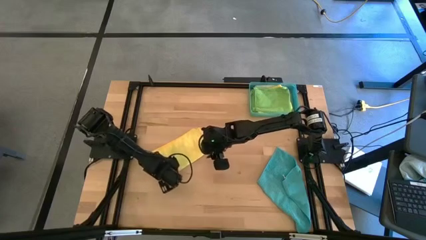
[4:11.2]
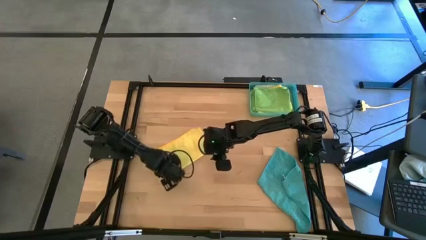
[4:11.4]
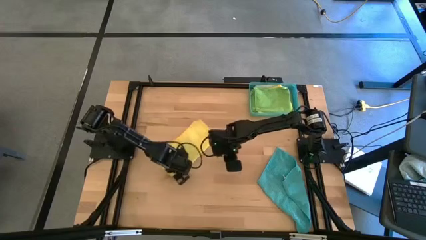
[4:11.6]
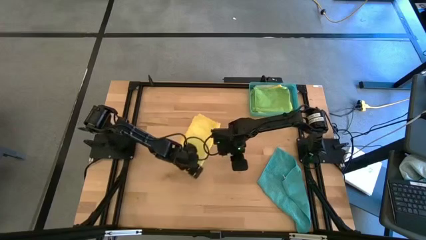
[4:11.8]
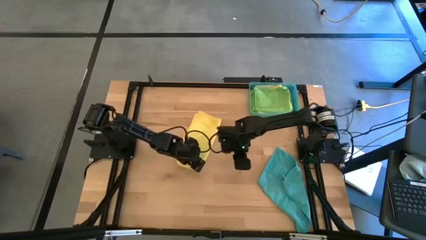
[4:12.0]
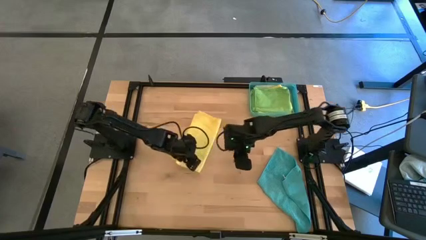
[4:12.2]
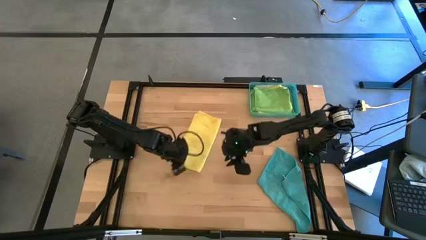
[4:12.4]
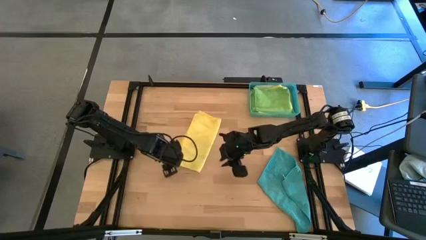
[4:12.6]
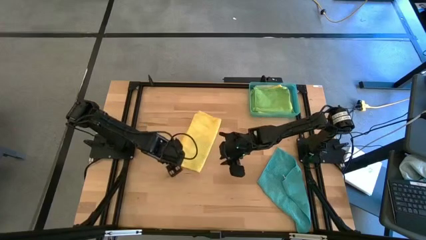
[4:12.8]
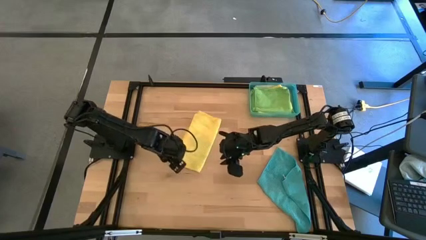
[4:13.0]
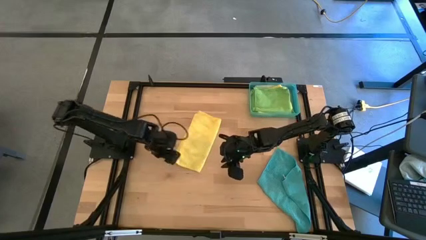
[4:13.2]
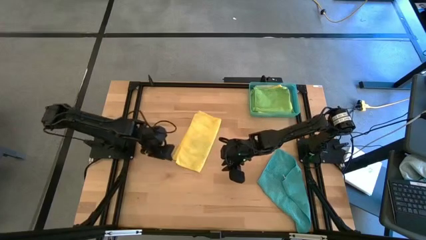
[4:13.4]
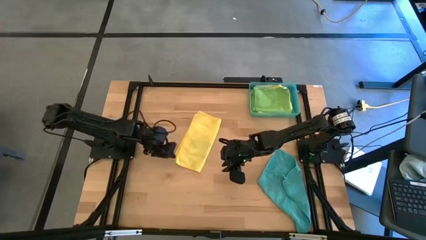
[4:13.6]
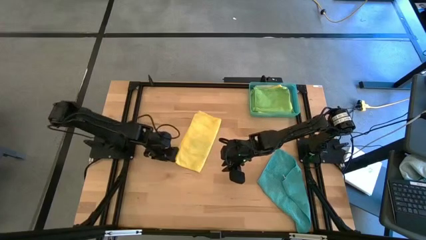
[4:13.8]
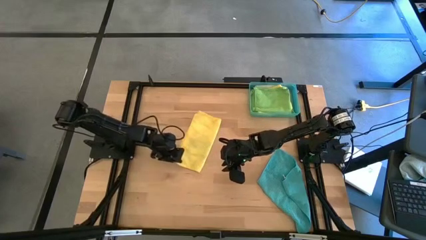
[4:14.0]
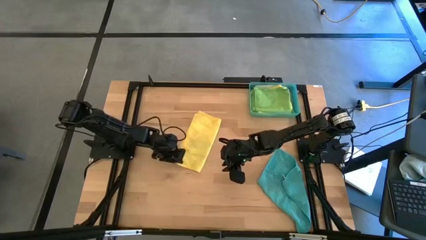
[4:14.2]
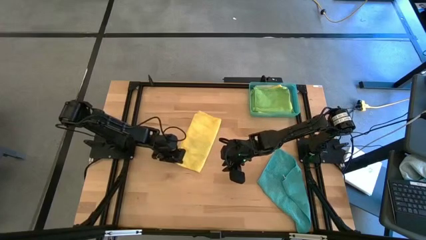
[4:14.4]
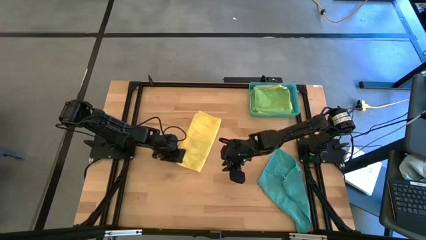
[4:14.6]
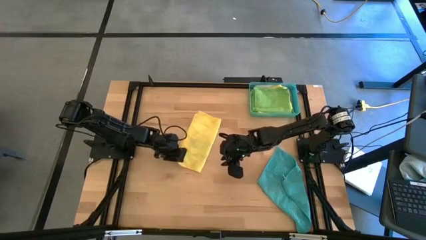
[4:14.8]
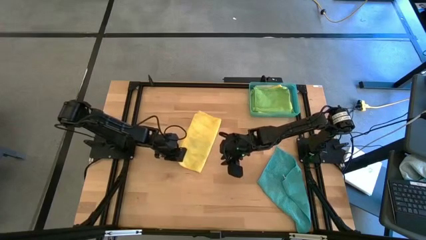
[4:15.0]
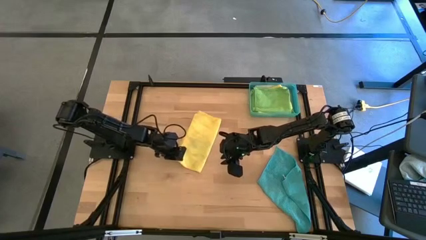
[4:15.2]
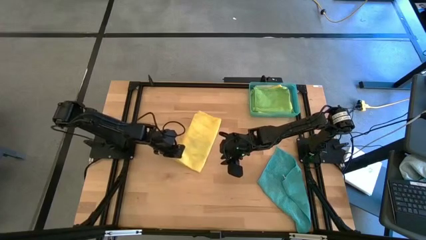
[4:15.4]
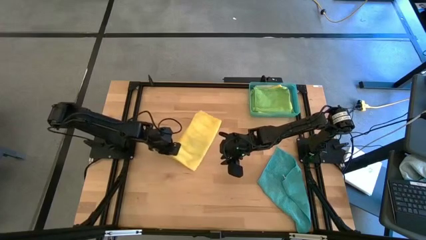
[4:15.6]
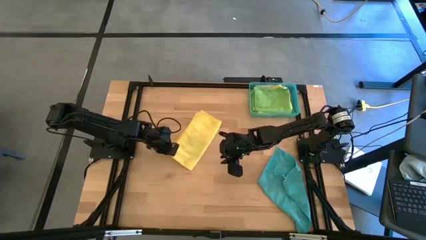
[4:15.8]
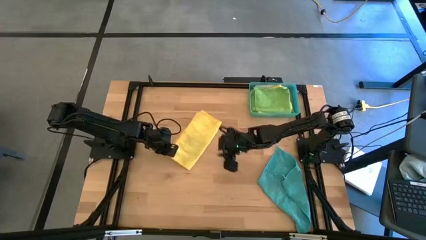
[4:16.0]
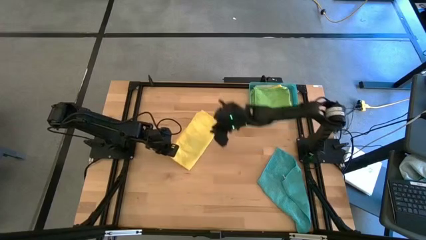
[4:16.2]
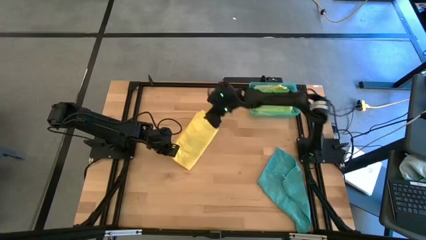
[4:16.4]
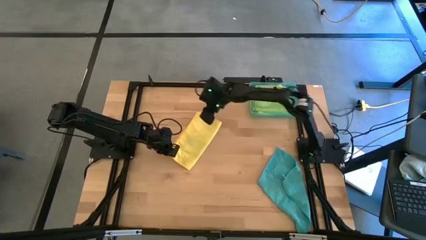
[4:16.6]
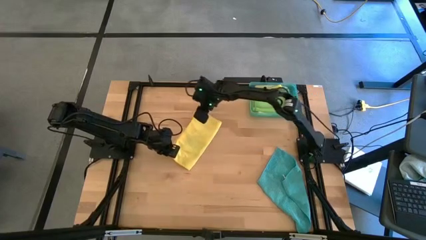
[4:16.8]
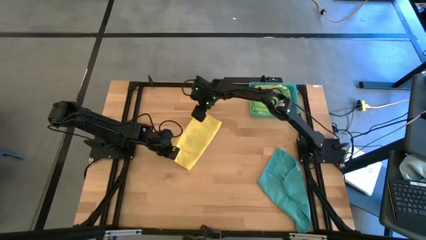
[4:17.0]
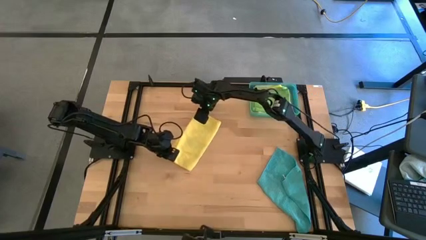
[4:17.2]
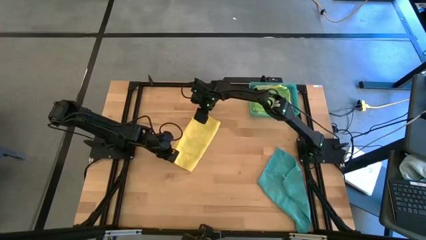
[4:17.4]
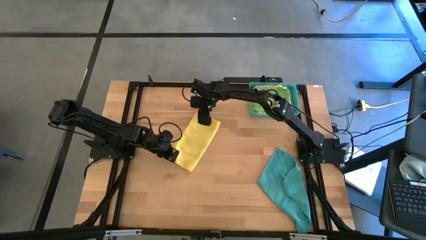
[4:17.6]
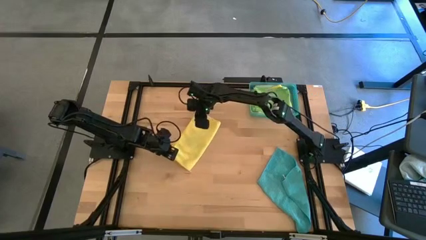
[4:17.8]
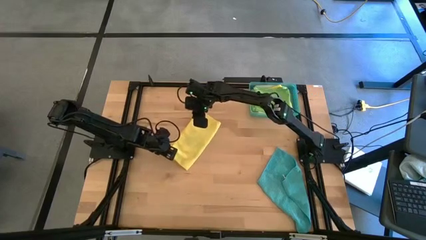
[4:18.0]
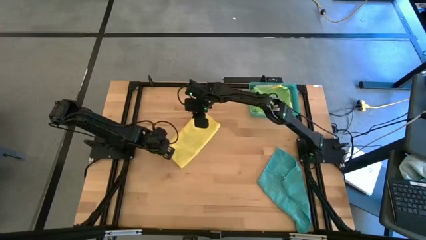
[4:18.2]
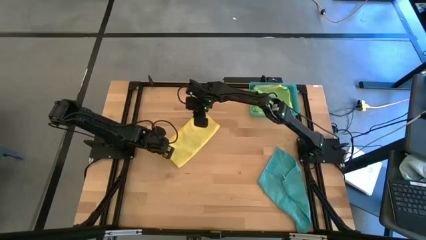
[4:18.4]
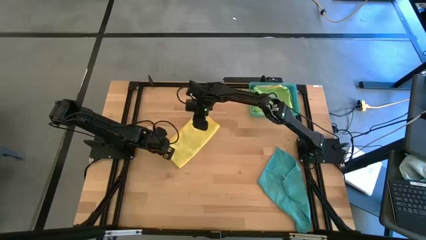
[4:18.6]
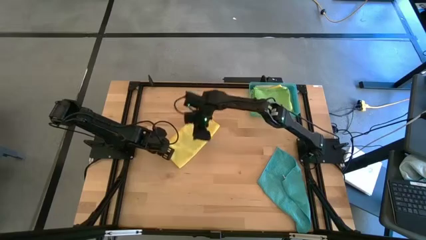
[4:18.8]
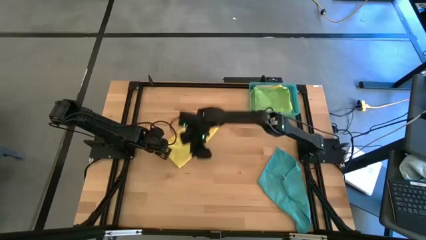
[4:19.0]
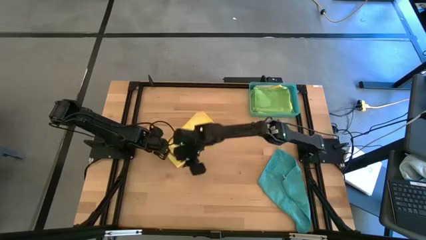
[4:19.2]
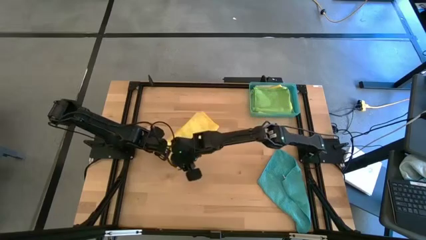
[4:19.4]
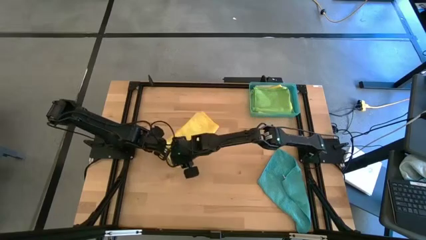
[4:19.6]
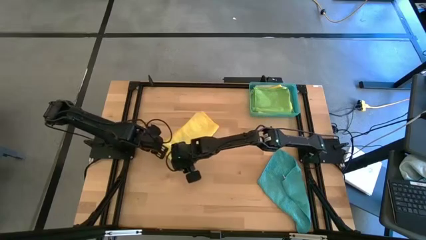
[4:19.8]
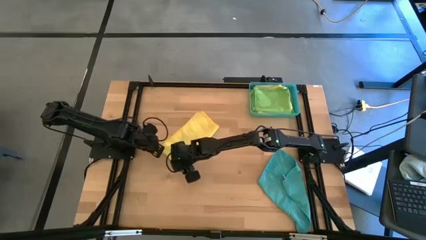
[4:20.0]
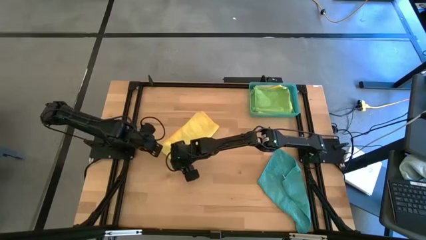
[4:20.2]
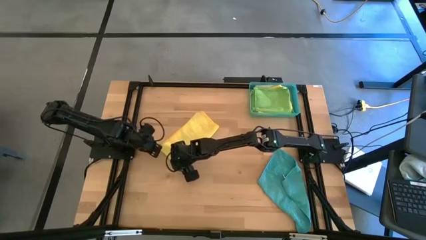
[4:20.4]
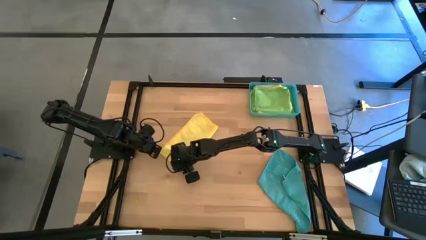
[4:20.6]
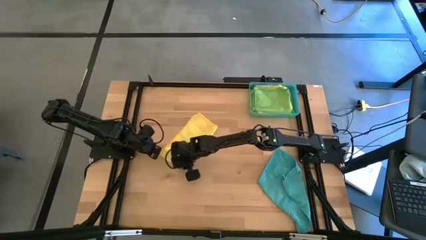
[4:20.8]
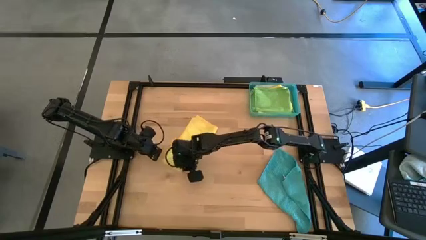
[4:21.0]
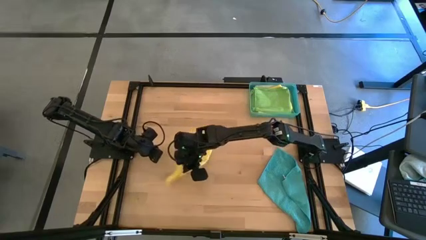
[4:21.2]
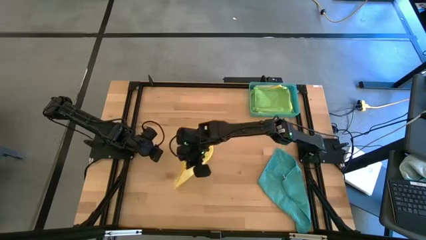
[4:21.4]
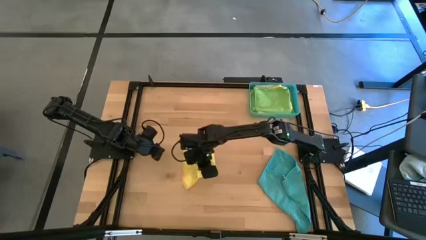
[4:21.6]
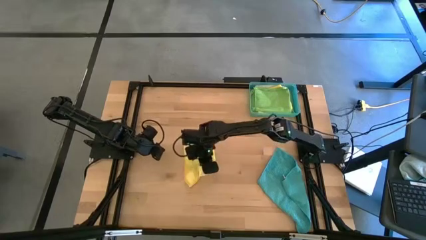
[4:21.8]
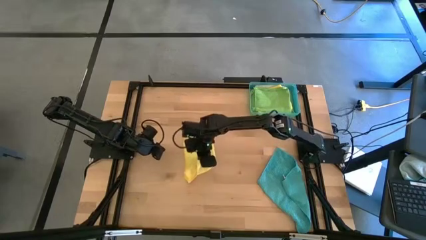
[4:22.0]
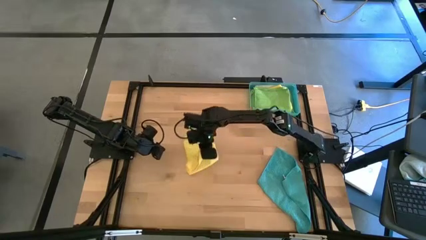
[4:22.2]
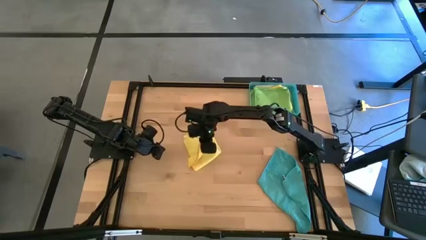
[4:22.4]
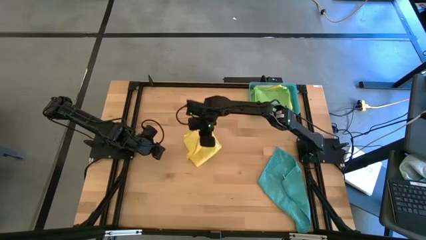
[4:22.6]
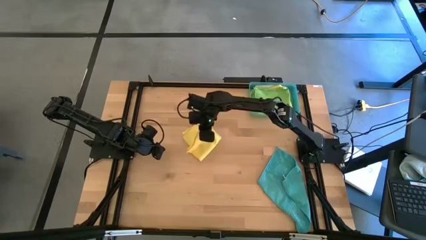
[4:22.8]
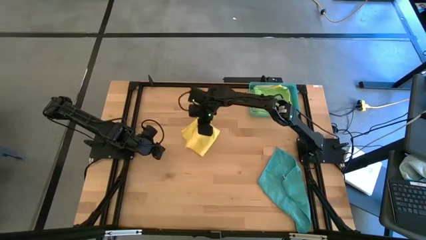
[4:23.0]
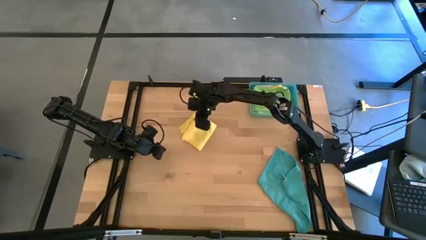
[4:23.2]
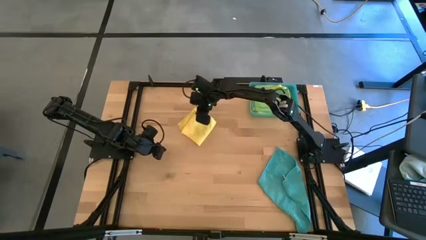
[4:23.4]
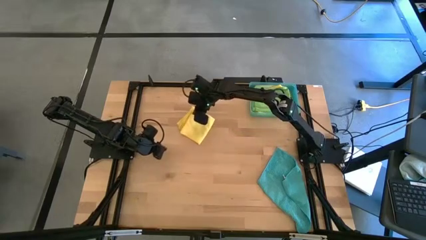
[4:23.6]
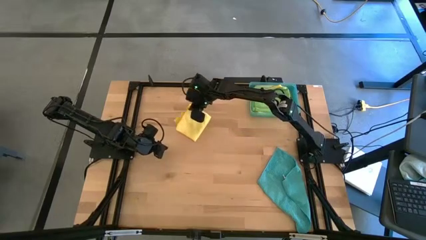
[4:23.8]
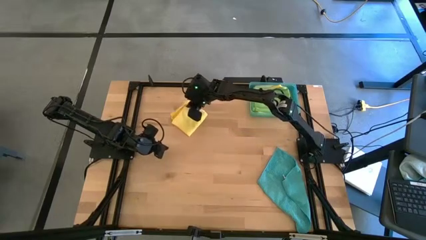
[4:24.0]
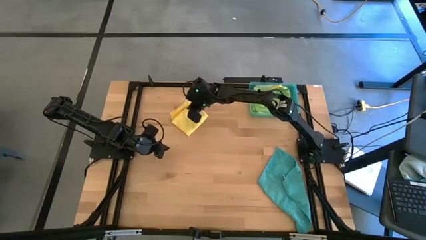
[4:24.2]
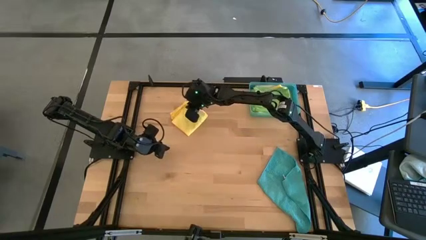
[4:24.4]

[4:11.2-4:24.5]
Task: Fold microfiber towels
Fold the yellow microfiber cloth
